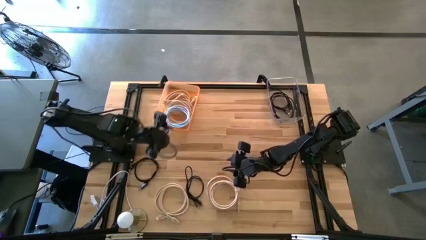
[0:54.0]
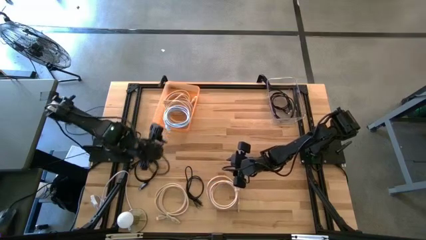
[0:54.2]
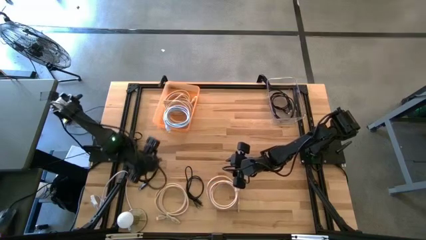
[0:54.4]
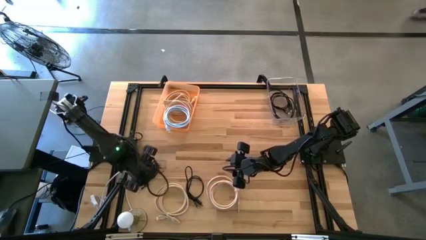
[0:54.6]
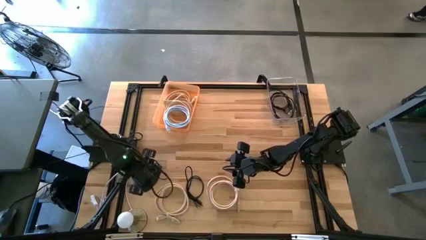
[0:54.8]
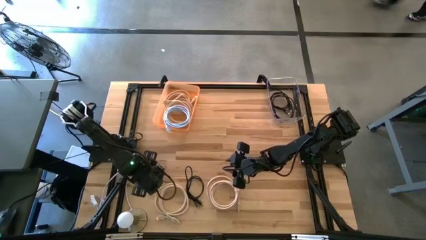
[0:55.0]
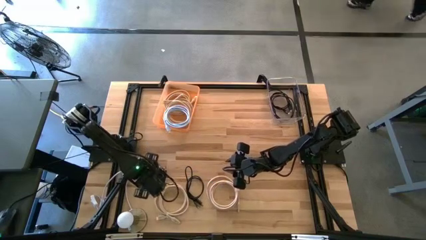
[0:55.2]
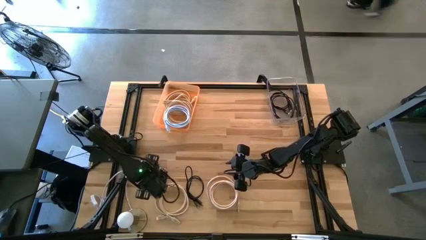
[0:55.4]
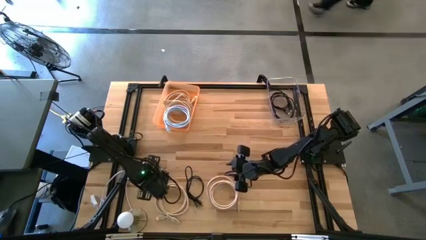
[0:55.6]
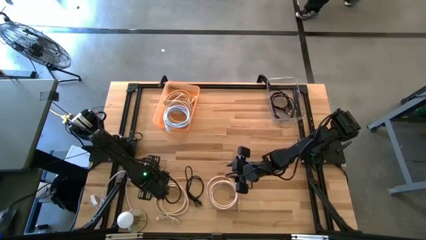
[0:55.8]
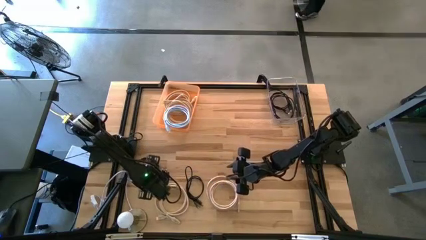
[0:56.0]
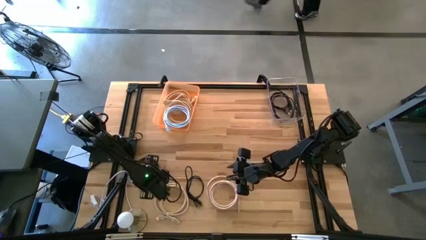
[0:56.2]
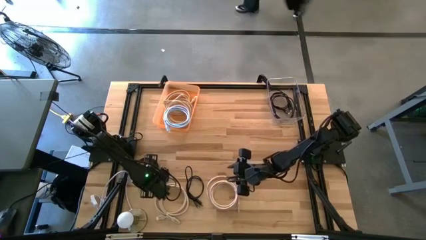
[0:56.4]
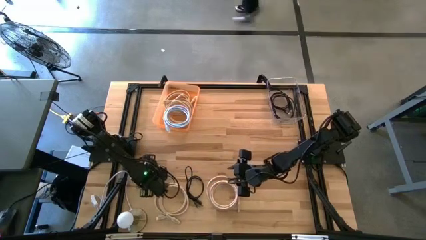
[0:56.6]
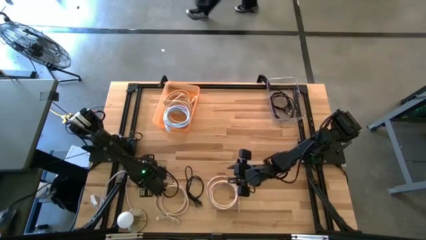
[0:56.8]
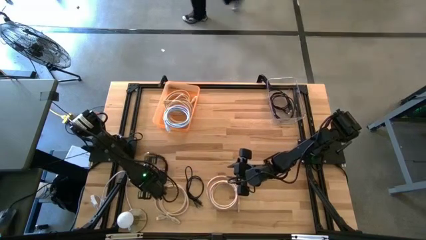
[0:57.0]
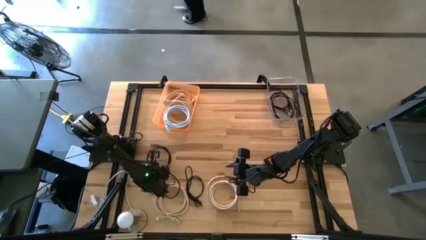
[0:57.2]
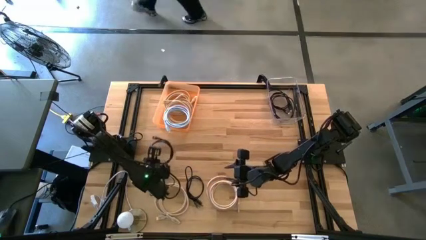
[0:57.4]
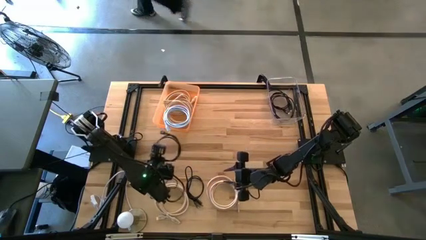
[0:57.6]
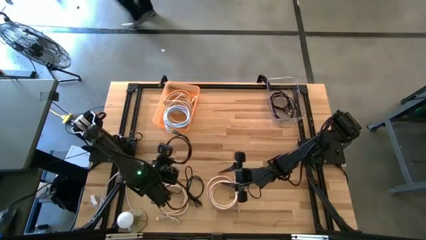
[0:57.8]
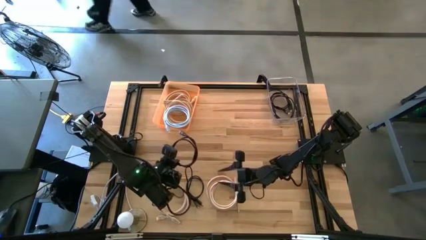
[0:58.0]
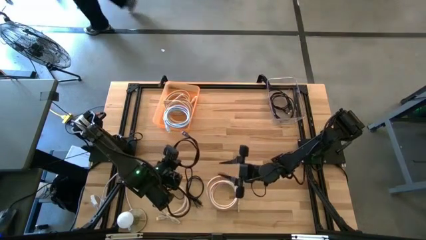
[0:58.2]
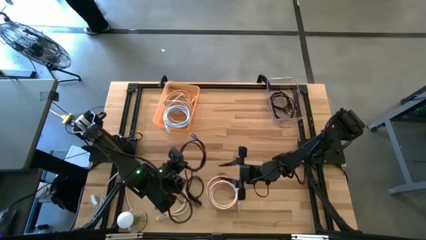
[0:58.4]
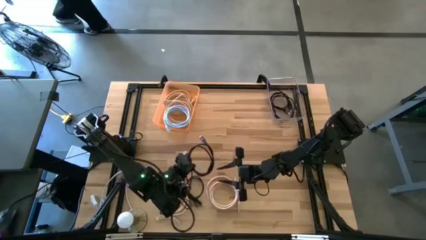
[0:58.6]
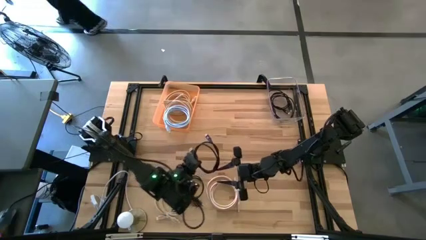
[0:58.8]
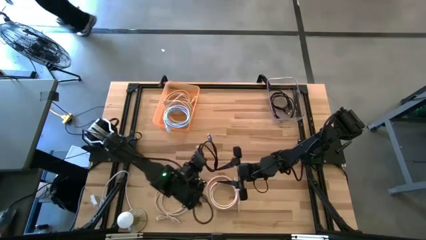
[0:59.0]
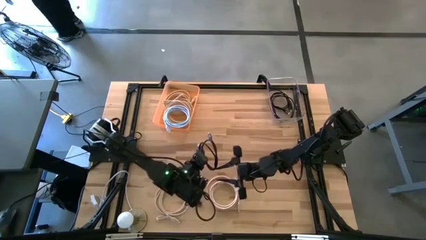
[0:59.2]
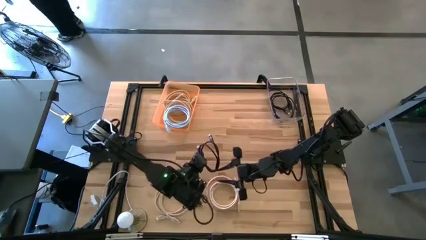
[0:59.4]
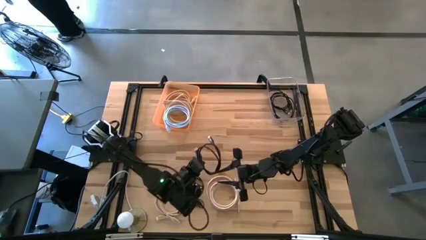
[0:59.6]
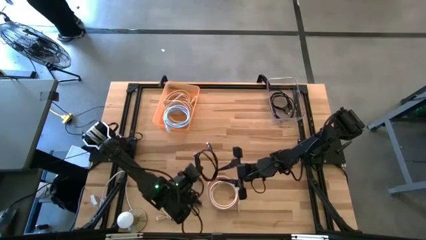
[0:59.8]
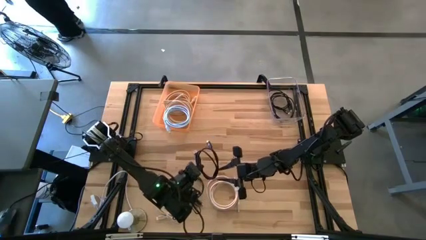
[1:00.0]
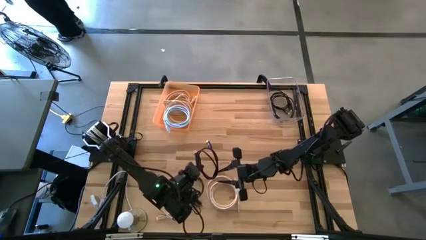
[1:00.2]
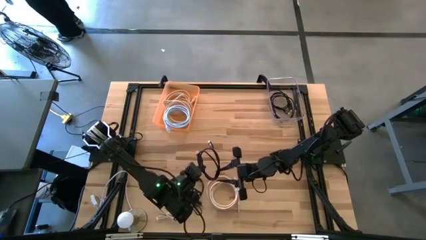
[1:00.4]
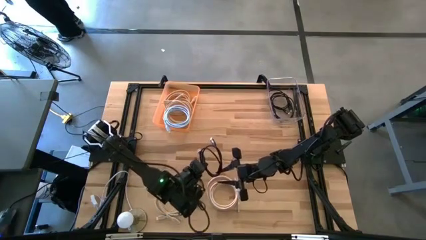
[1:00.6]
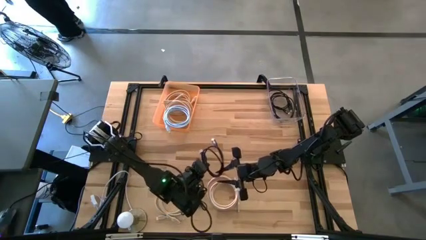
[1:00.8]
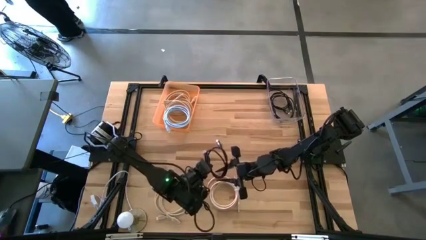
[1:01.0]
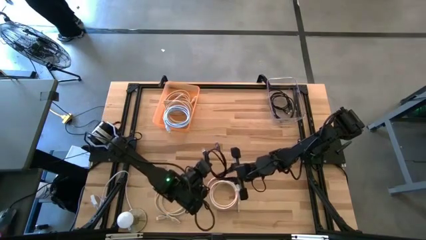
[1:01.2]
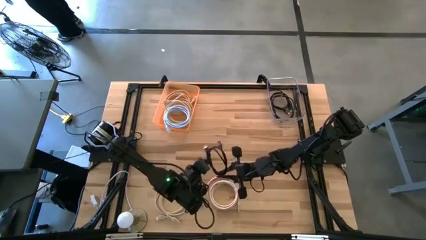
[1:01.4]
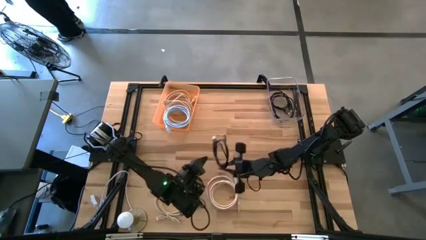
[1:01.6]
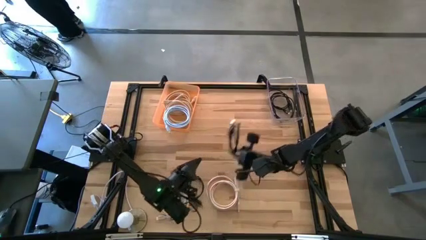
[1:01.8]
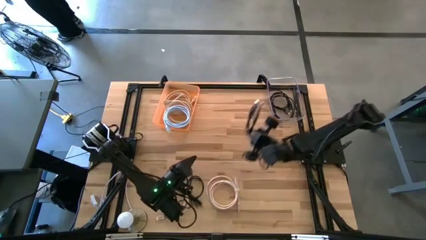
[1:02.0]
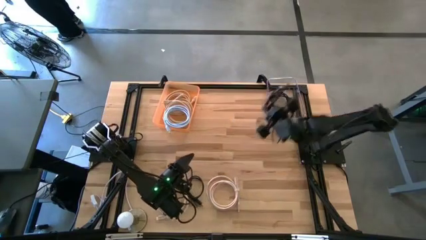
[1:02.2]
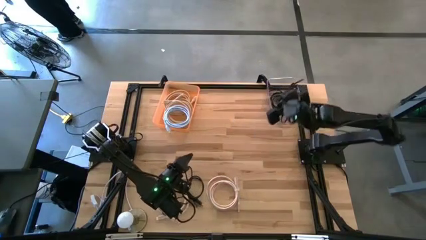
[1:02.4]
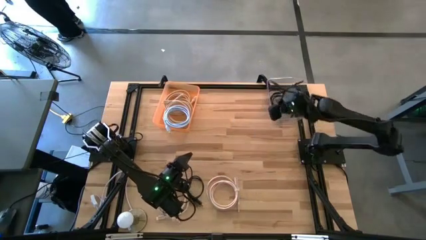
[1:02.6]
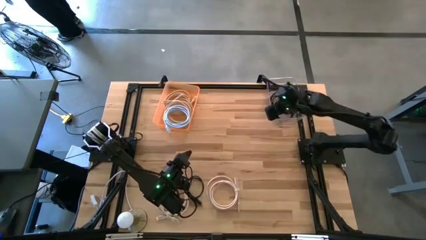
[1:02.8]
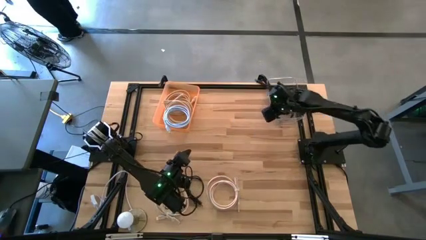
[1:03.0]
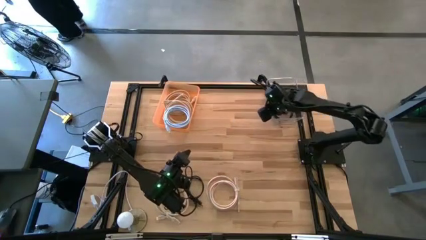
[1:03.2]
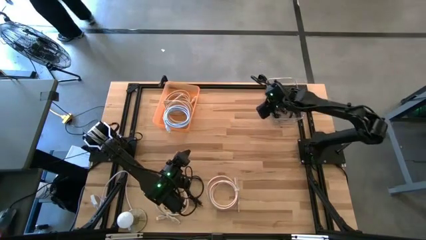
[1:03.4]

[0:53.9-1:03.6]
Task: Pick & Place USB Port
Put the black charger cable into the transparent bin

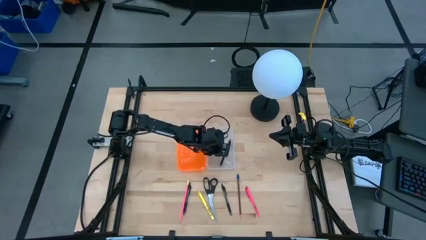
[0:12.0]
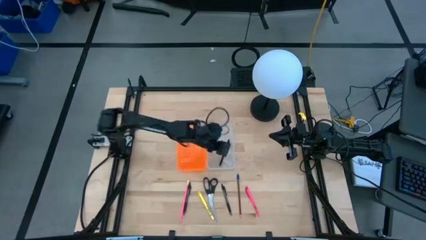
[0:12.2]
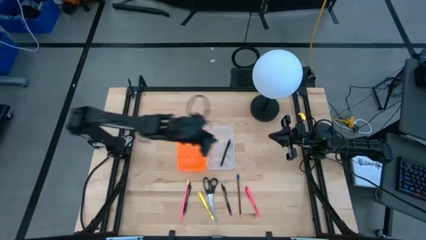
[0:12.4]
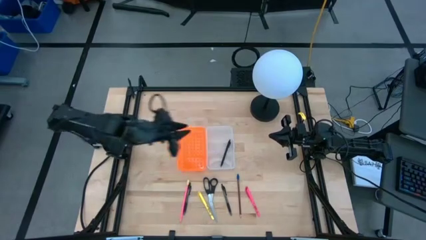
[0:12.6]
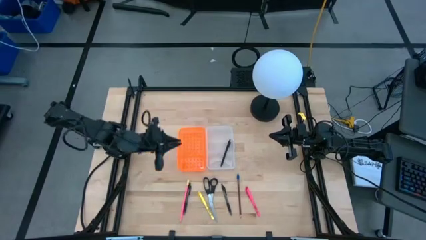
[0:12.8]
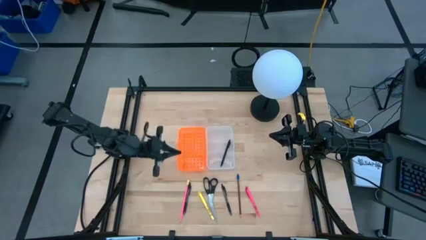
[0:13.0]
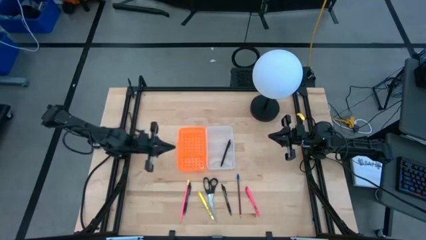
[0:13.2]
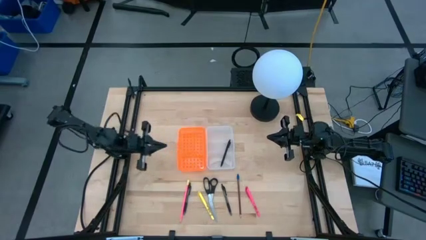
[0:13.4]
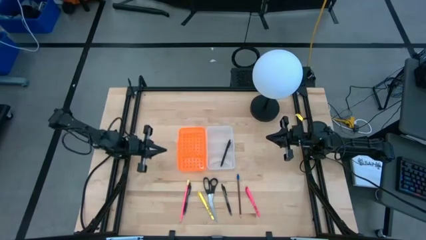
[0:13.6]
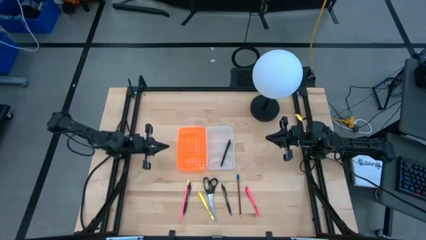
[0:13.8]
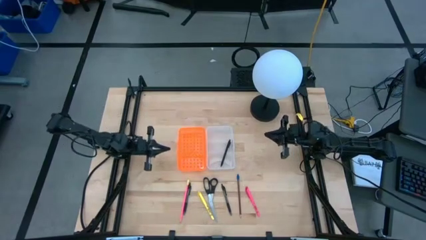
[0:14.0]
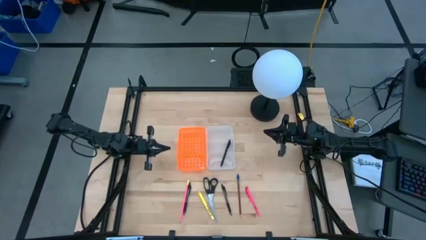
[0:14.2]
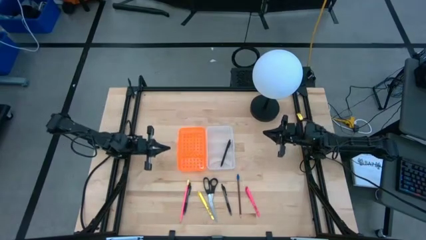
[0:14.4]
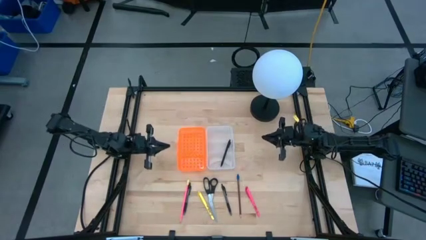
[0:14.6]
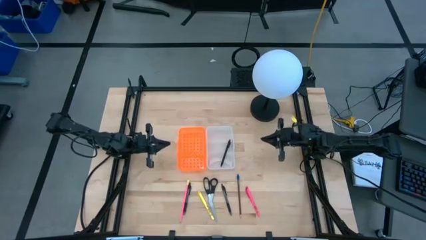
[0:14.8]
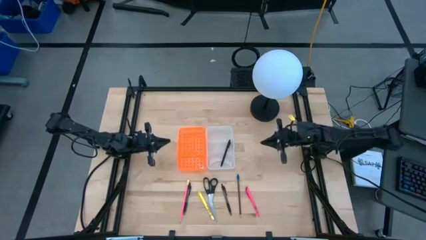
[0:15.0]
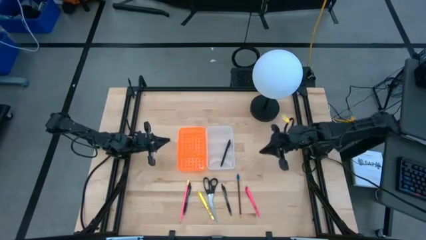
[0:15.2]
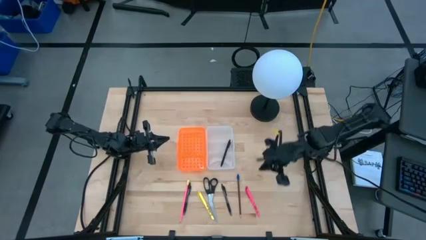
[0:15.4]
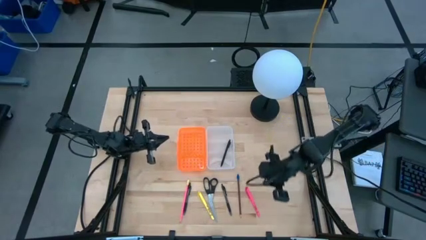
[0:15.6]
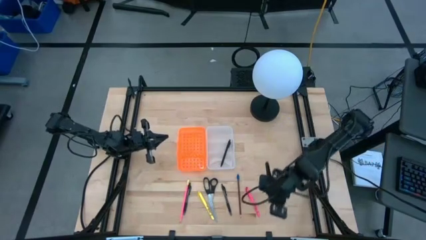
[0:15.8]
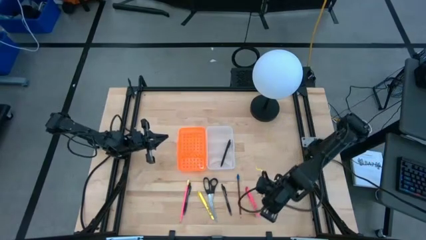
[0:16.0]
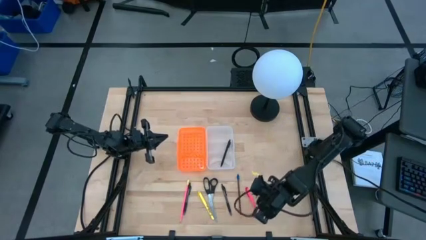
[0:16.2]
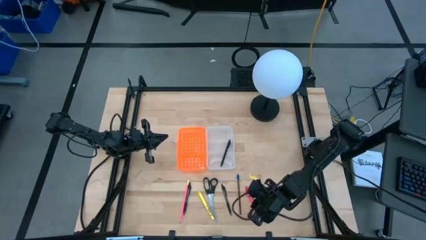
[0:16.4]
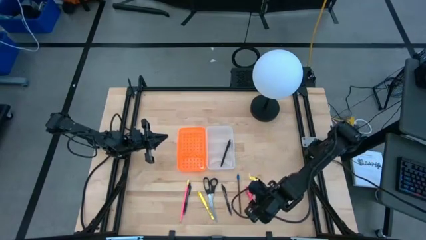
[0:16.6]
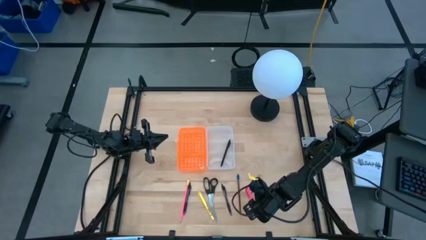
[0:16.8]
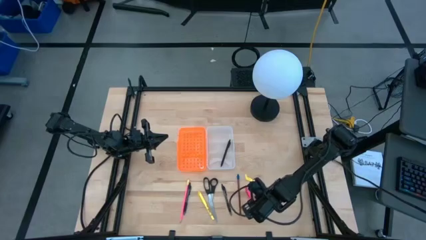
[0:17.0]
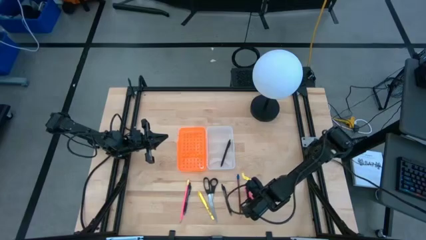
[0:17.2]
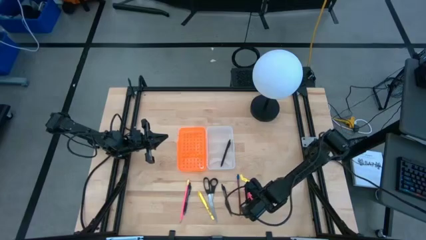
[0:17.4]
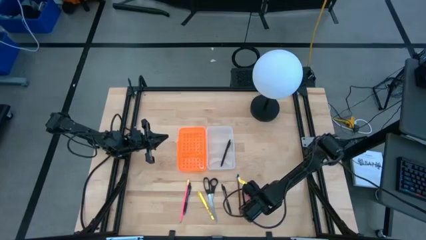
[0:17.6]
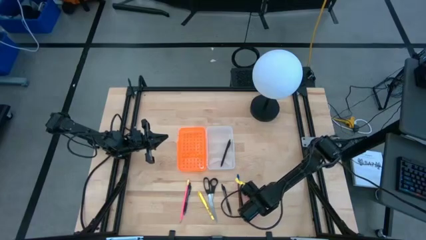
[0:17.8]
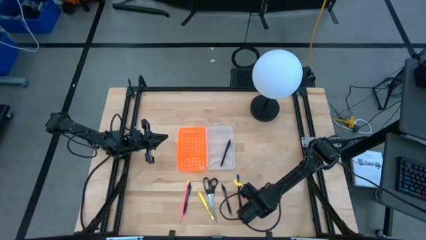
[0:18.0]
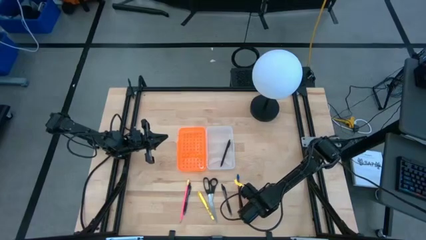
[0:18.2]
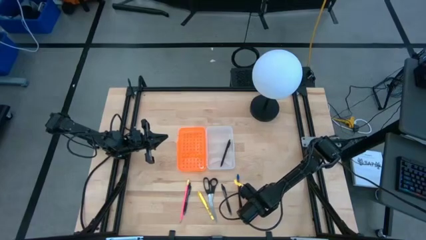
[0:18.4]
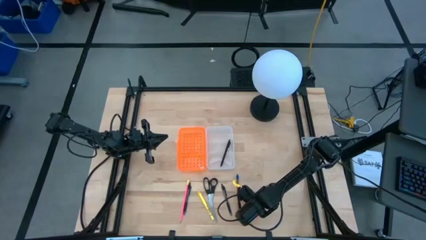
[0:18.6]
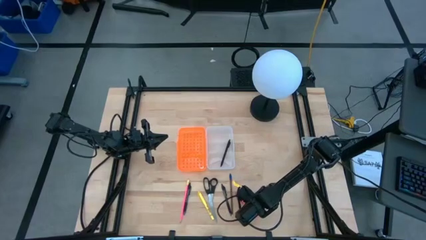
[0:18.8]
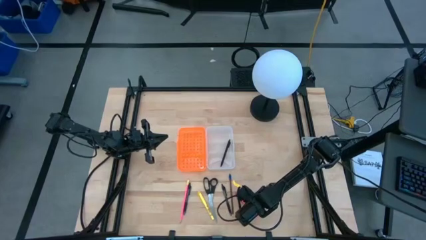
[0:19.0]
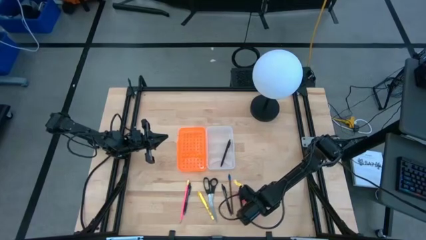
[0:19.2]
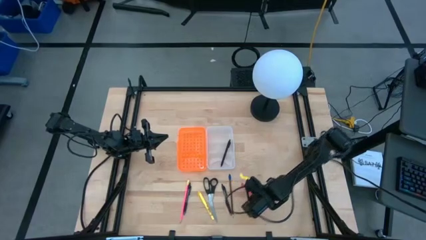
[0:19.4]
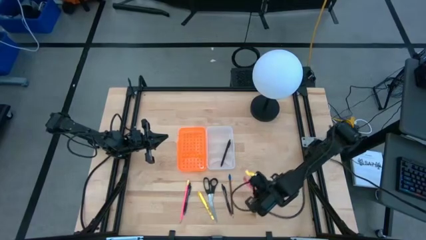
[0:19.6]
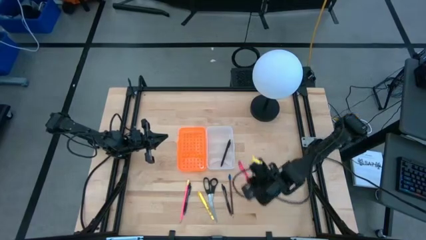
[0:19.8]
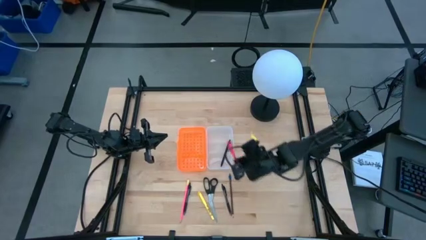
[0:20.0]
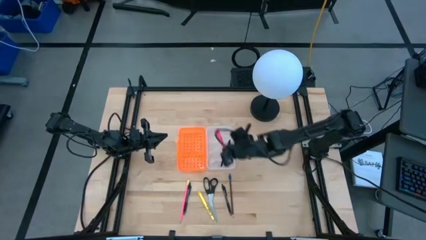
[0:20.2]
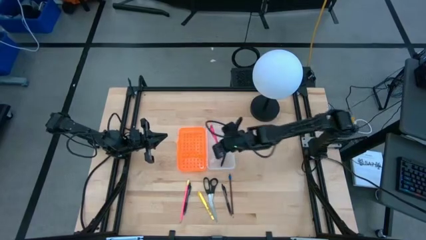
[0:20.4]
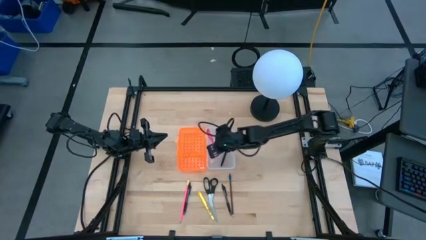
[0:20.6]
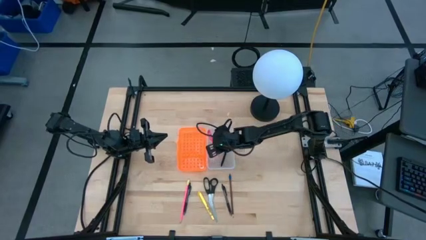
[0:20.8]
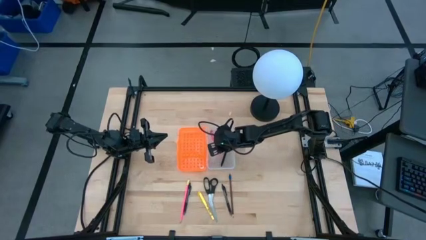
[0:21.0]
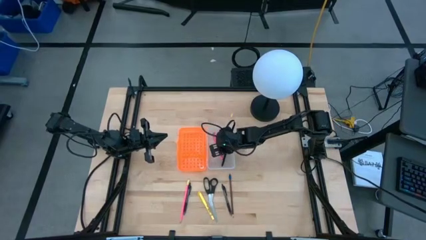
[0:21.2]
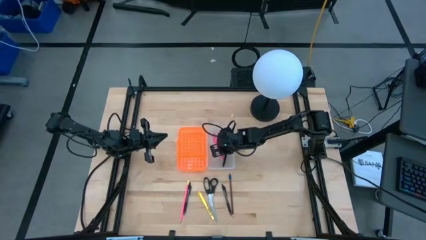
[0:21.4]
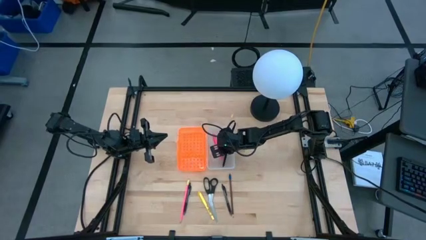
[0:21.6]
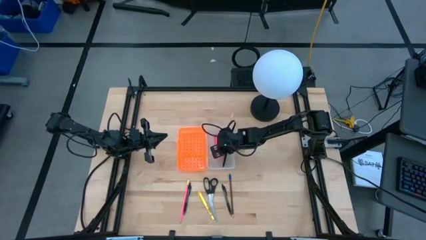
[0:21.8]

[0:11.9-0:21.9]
Task: Pick & place school supplies into a supply box
Put the pink pen into the supply box
